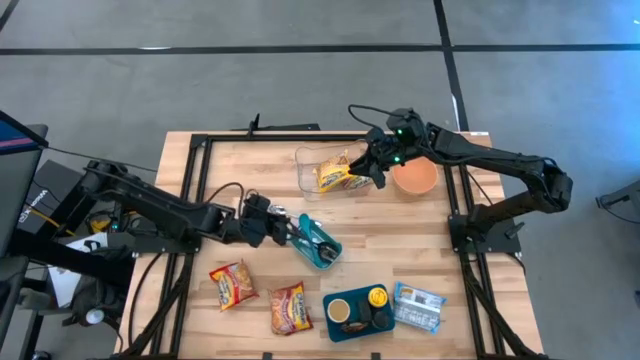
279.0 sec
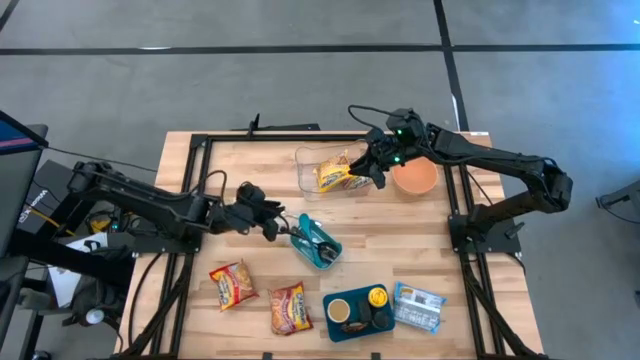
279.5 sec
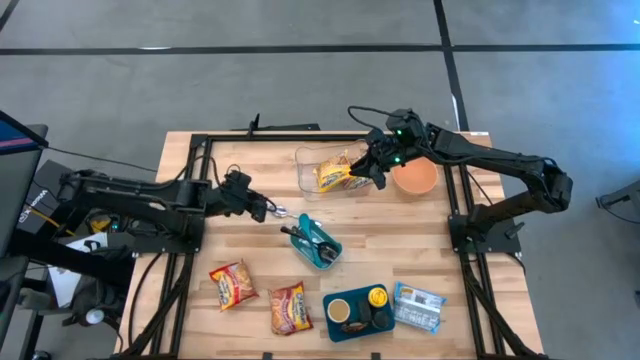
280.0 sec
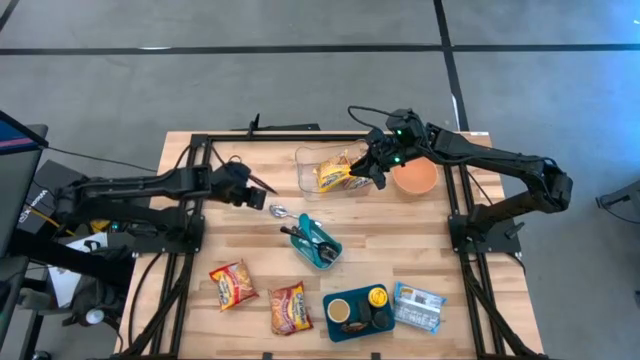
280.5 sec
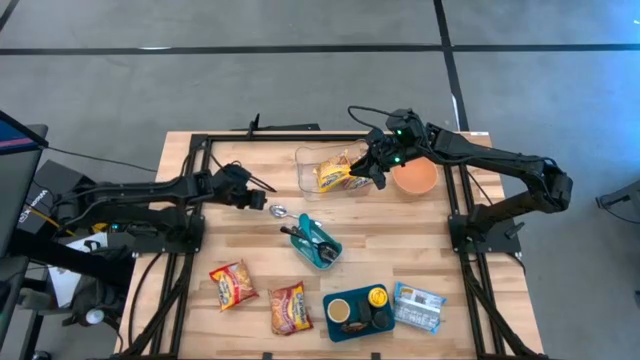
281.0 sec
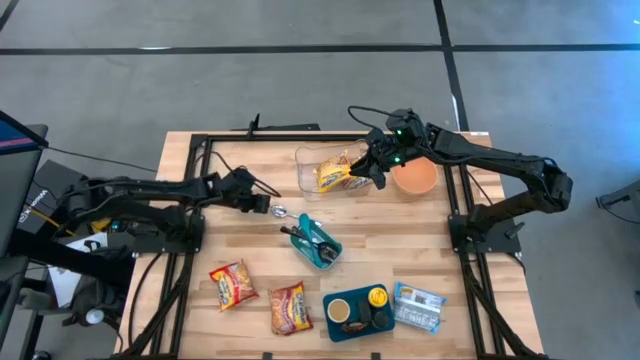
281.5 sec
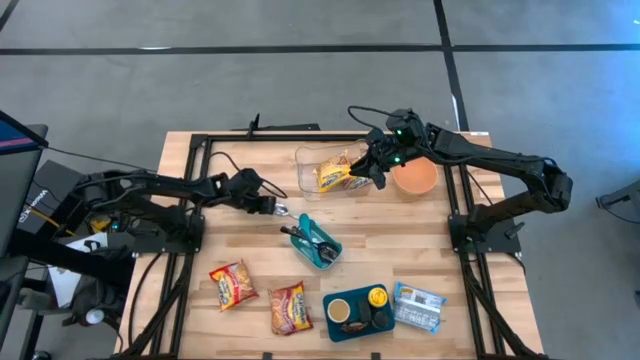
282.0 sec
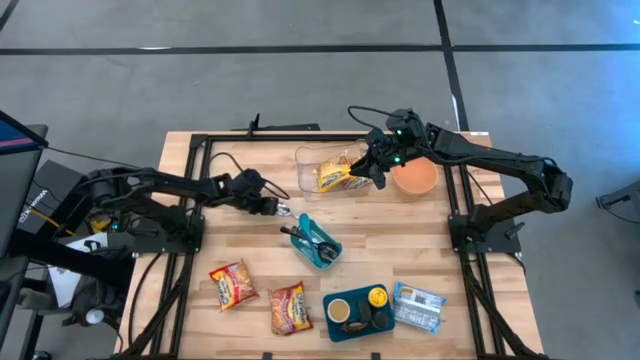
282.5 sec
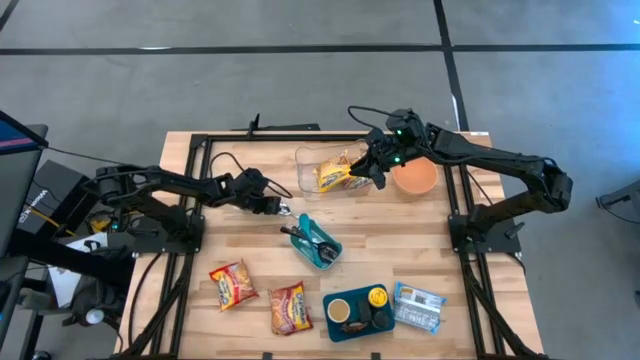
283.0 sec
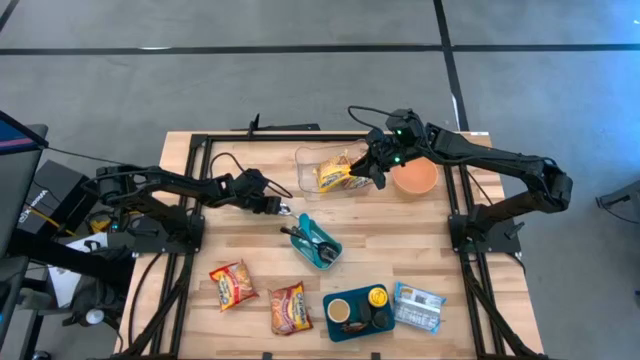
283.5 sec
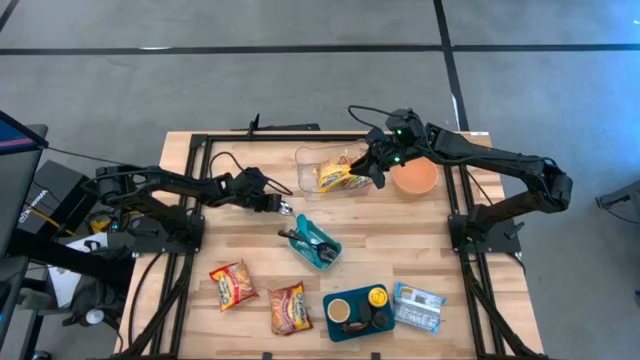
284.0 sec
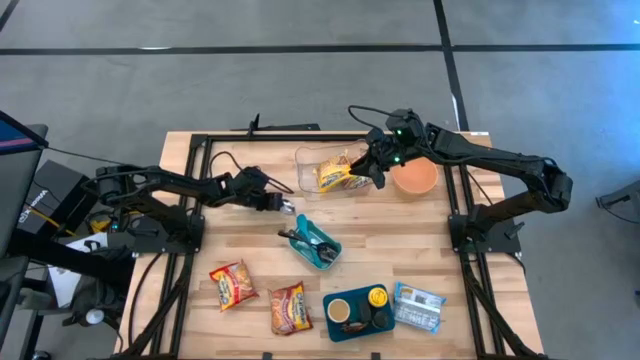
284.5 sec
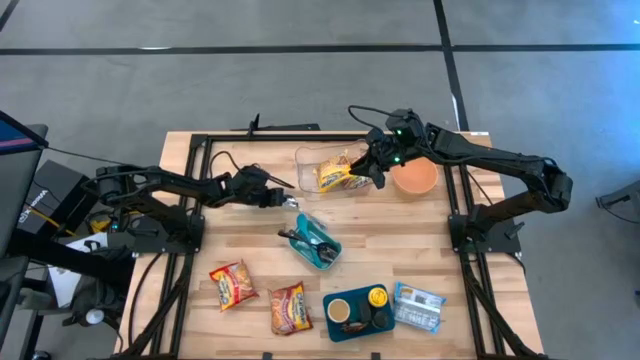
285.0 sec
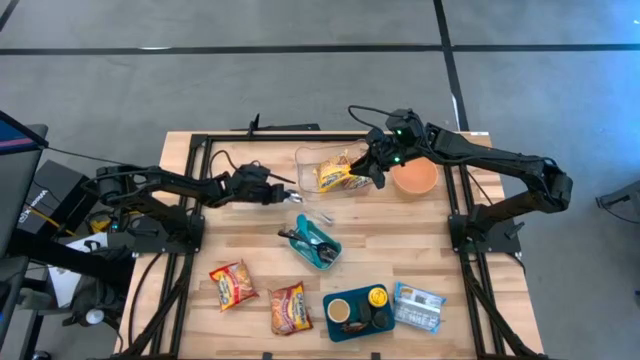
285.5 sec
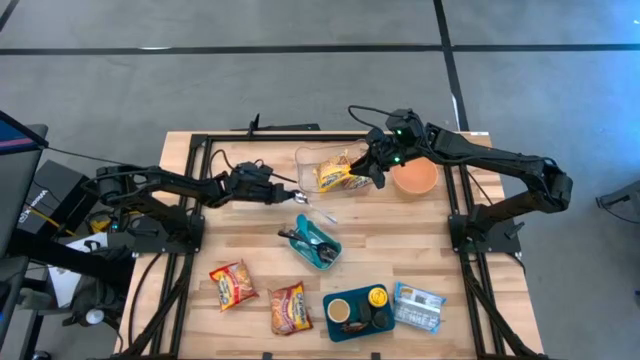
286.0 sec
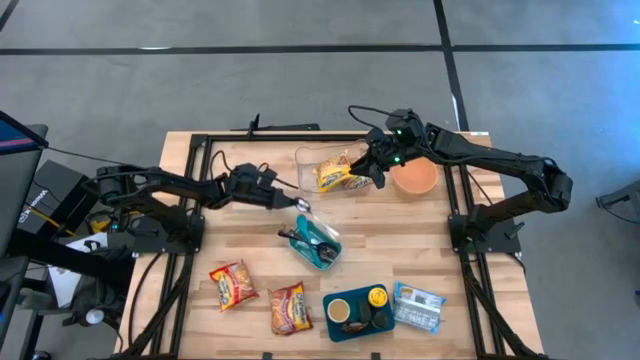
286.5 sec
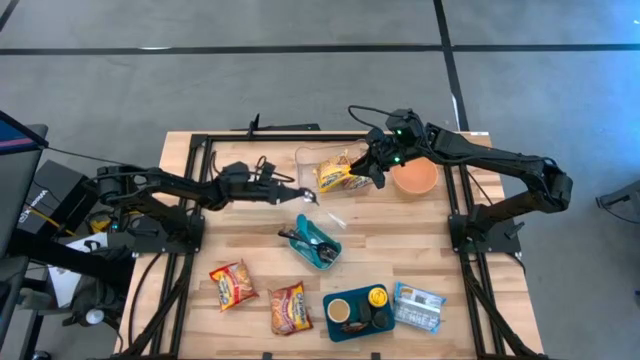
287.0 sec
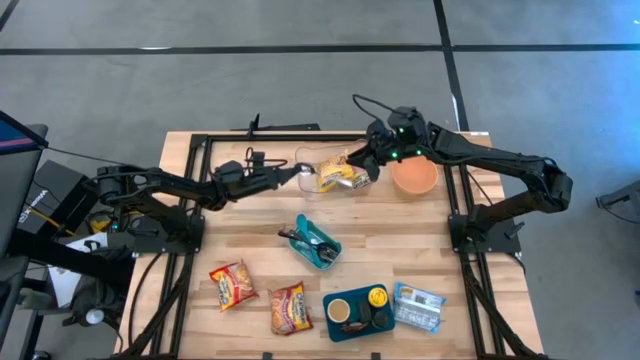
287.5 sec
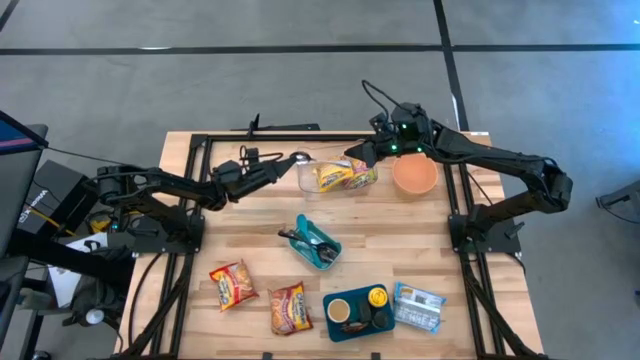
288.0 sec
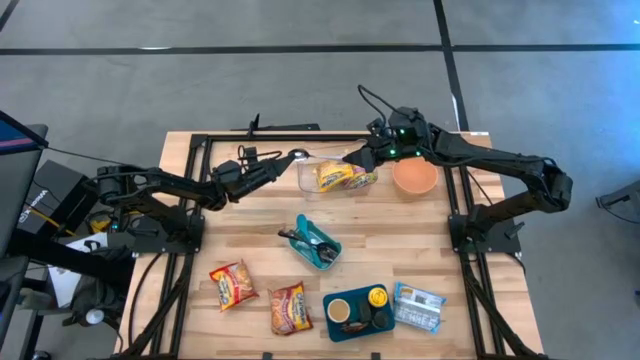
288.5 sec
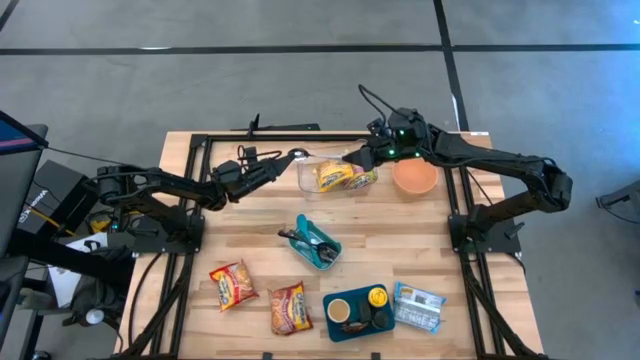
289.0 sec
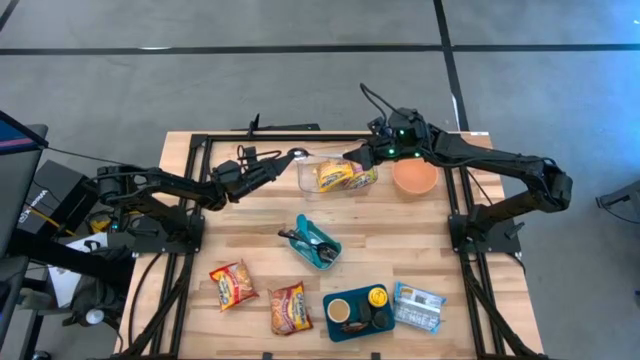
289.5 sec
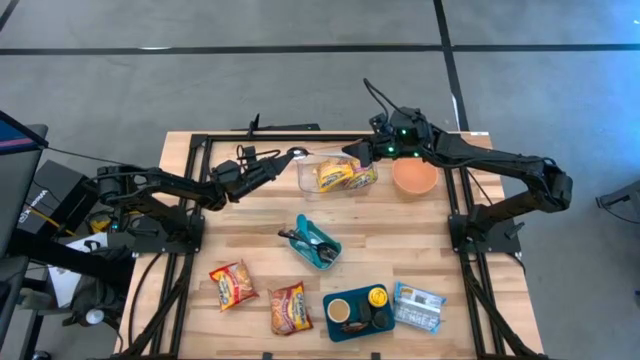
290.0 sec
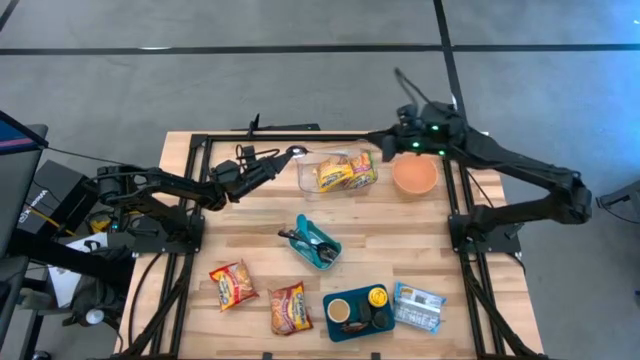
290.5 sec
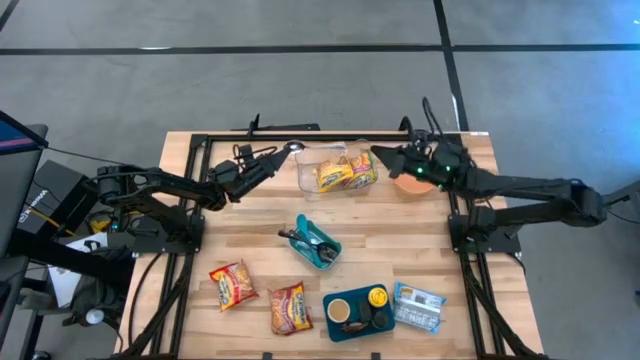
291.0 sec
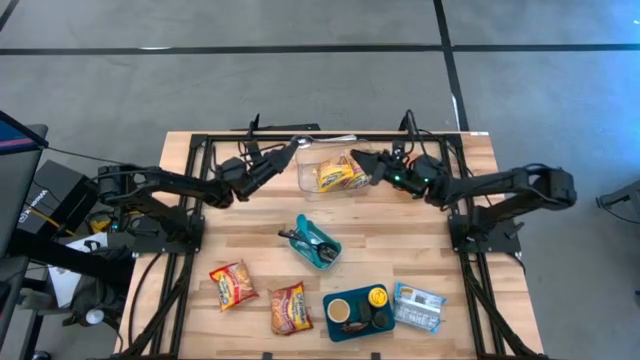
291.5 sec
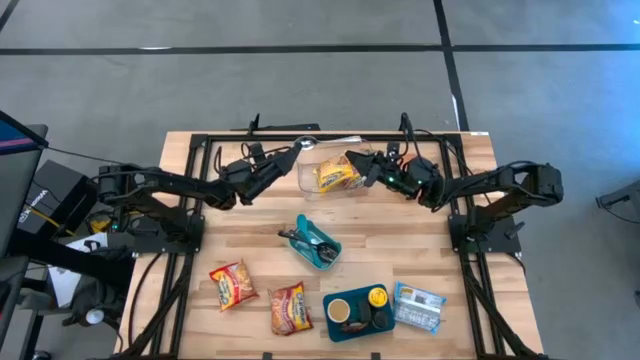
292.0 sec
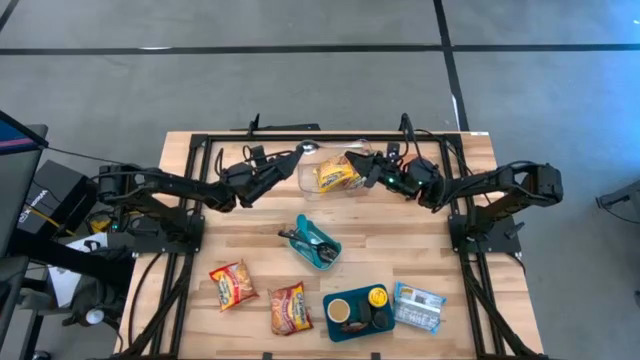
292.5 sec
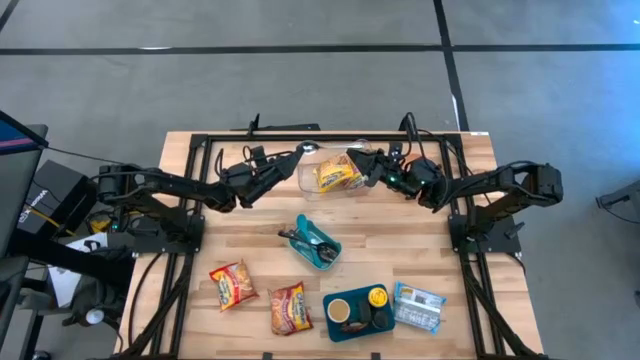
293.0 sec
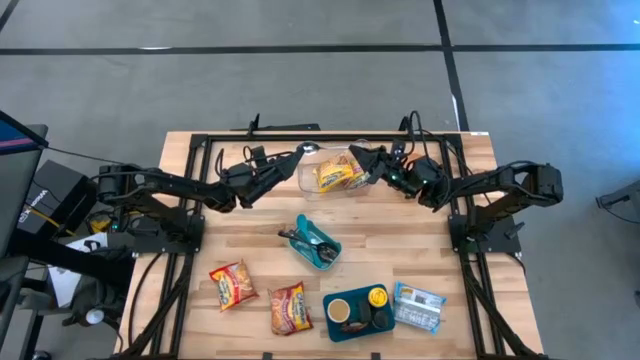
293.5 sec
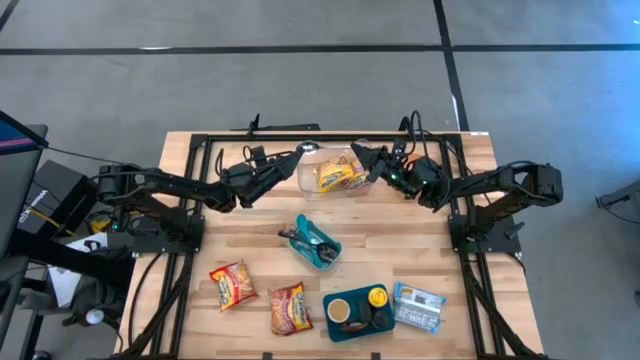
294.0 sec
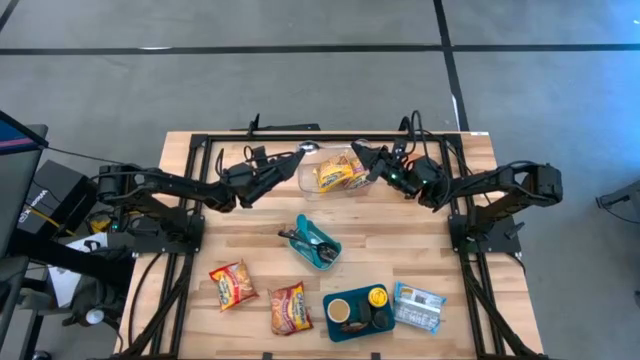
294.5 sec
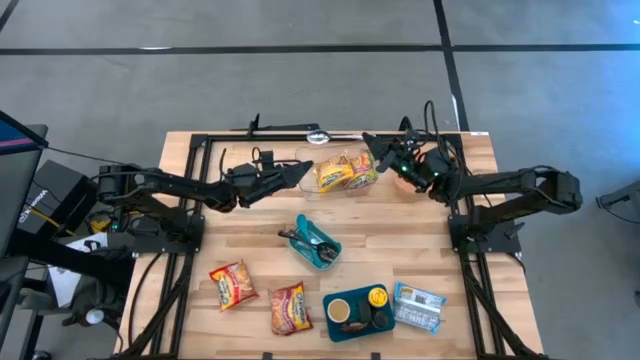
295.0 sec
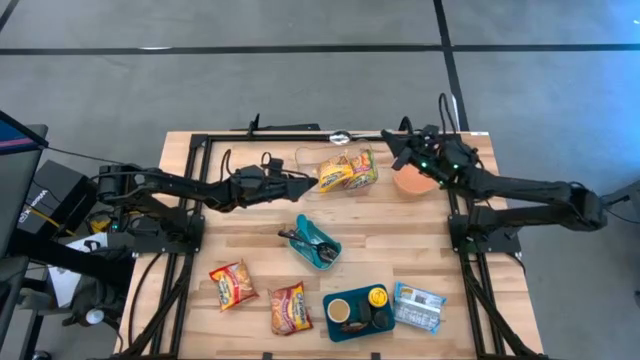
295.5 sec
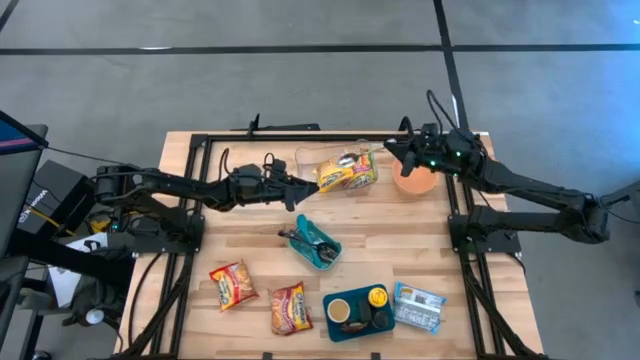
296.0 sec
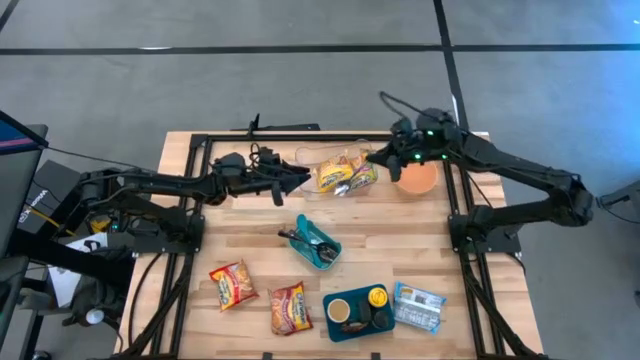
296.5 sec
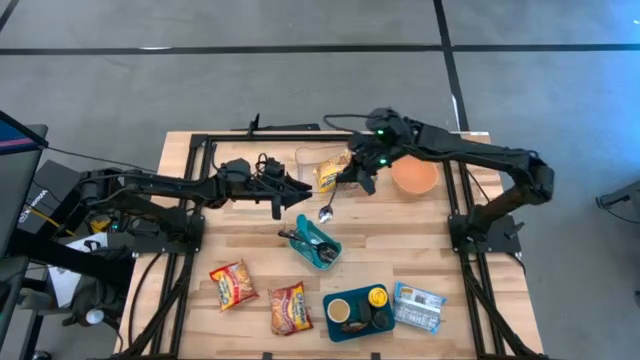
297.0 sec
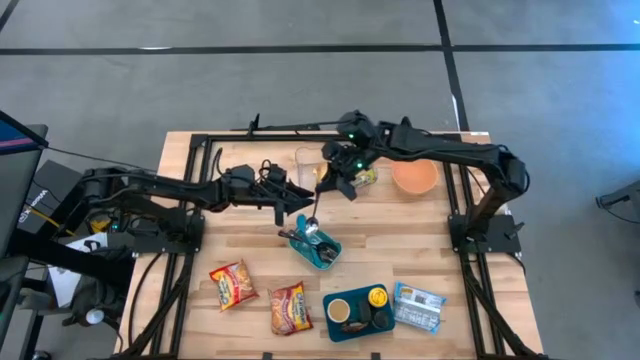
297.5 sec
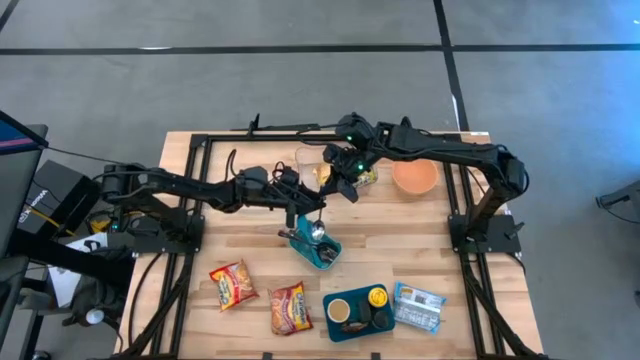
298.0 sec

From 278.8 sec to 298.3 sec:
Task: Pick & Place Food Item
Put the silver spoon into the green bin

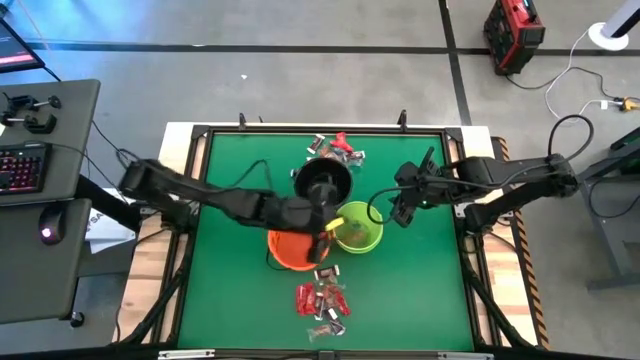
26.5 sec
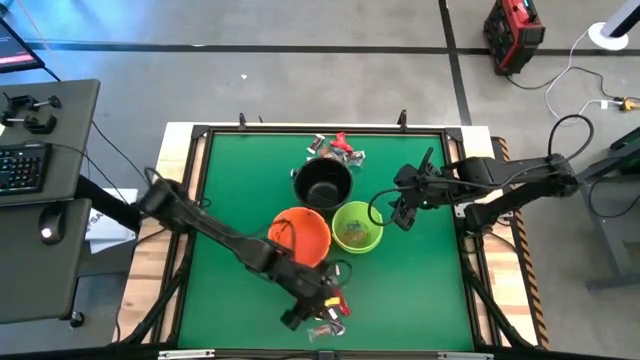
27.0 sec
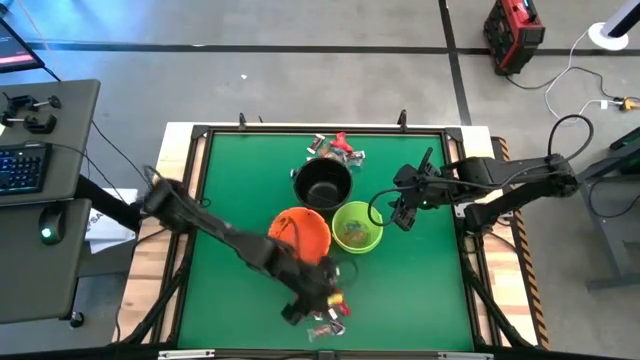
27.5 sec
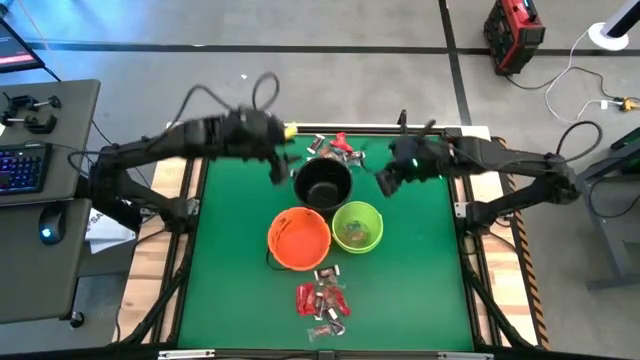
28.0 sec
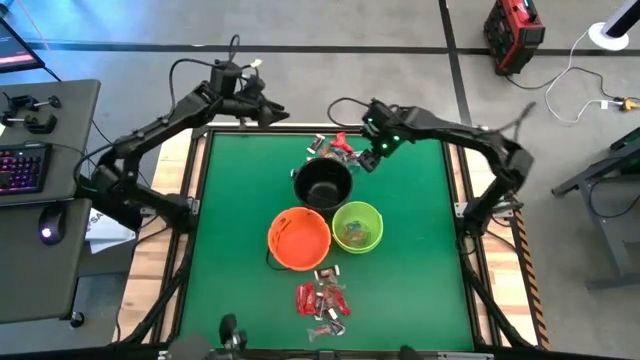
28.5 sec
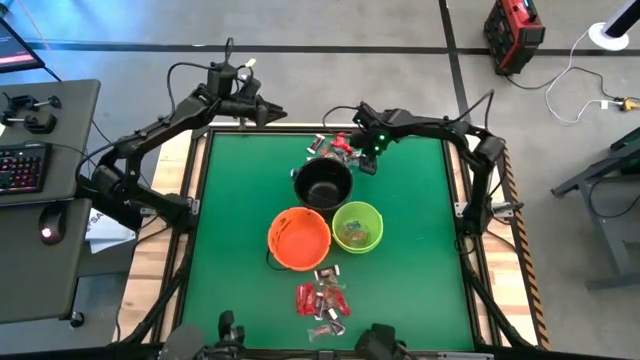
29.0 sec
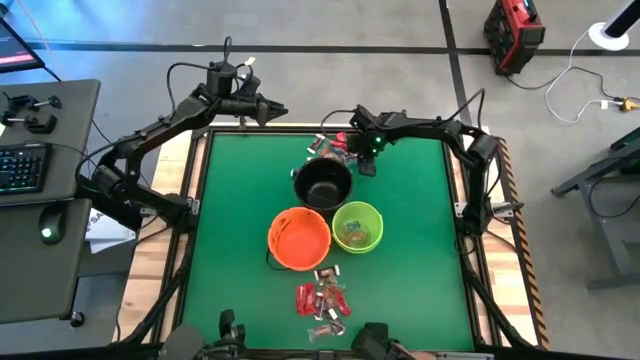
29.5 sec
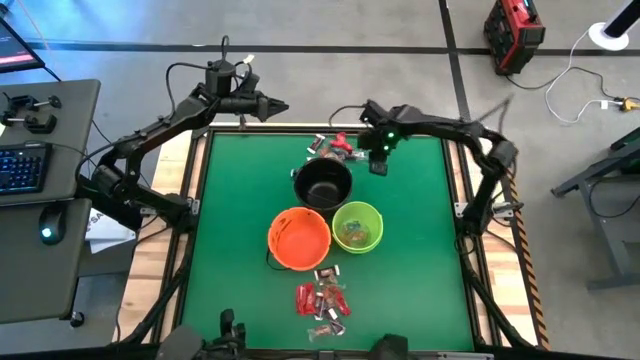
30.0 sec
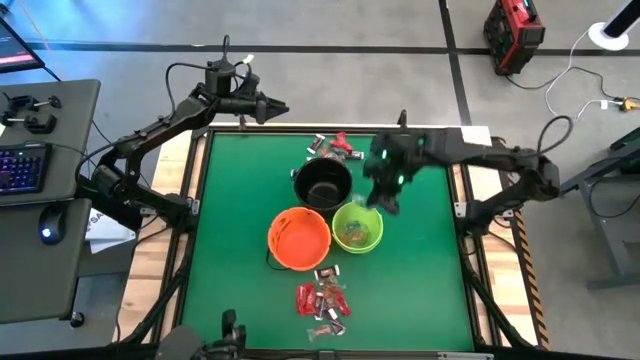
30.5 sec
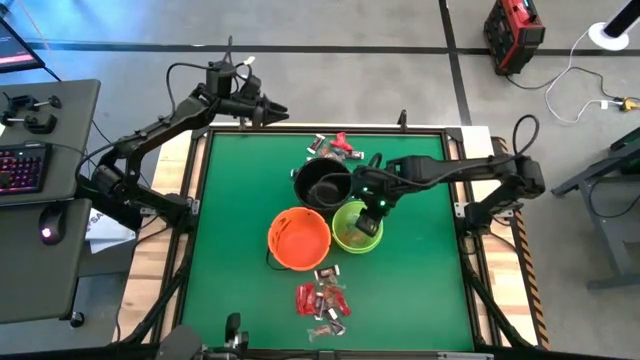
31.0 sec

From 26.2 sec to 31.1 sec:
Task: Sort candy by brand, put in halloween buckets
Put the blue gummy into the green bucket
